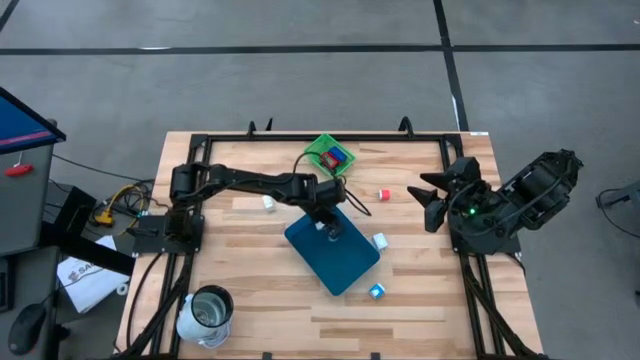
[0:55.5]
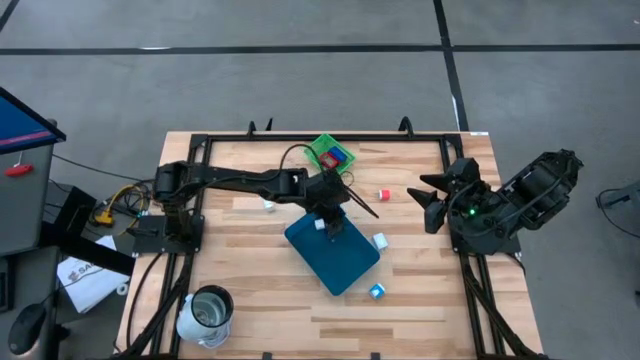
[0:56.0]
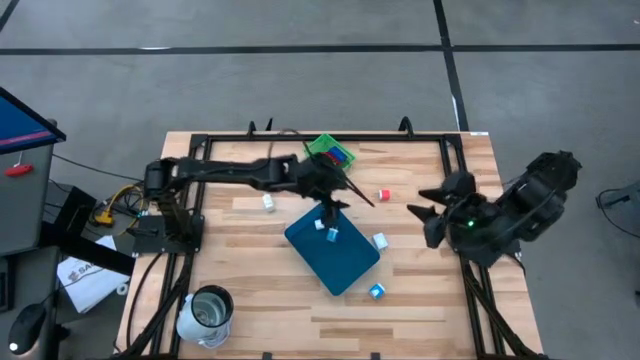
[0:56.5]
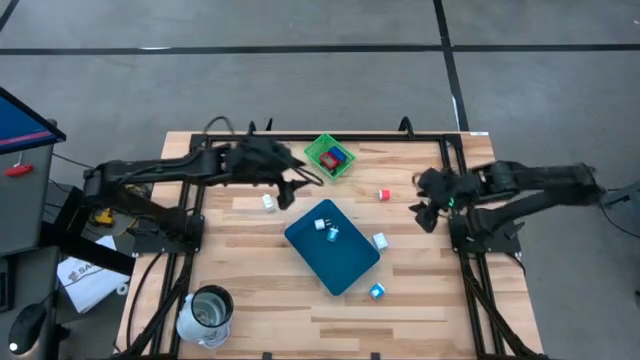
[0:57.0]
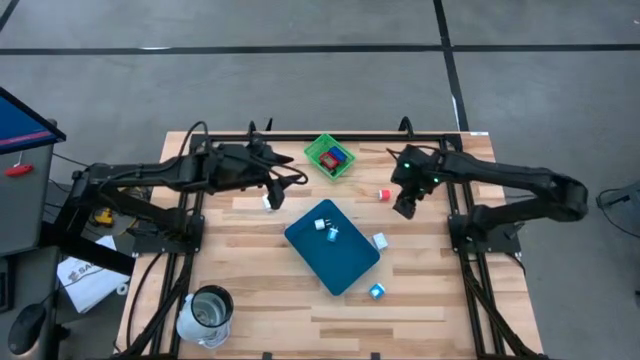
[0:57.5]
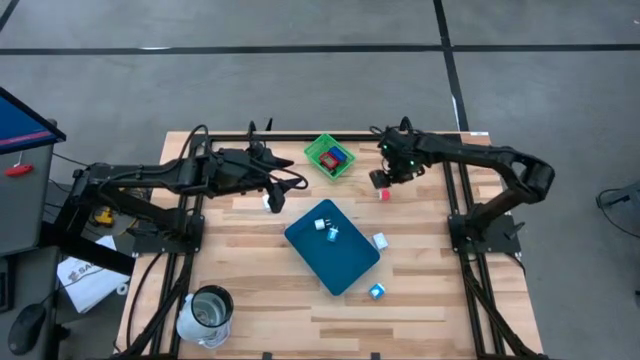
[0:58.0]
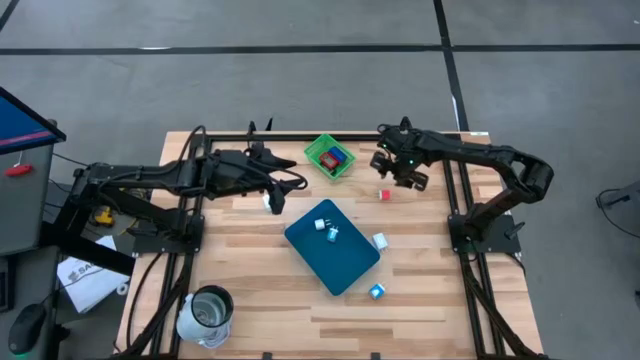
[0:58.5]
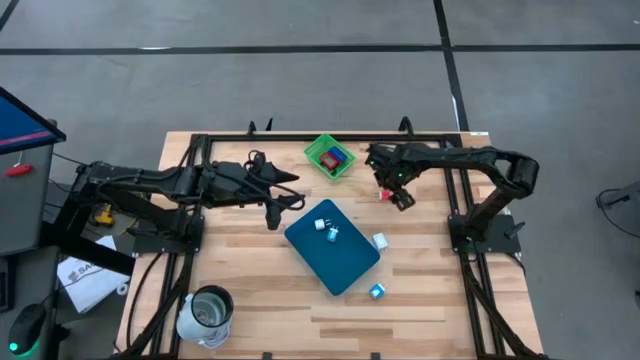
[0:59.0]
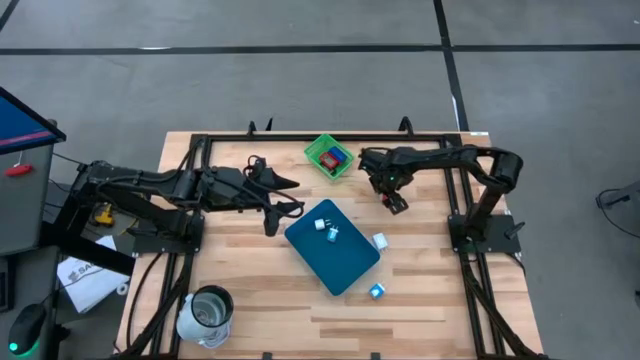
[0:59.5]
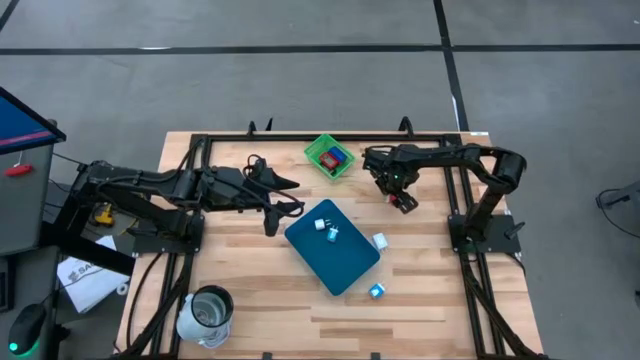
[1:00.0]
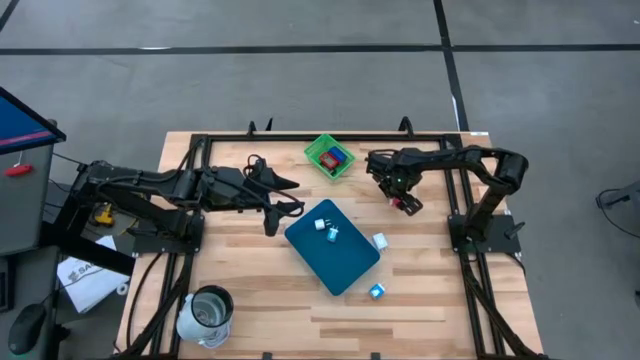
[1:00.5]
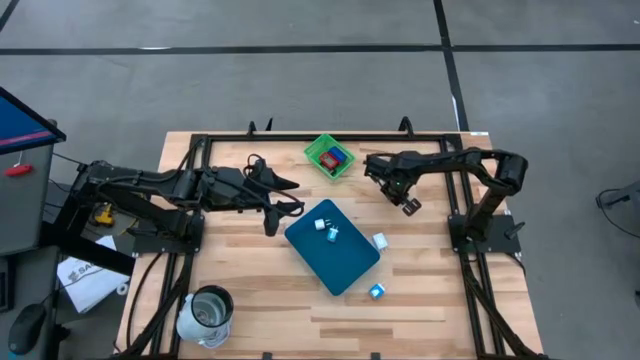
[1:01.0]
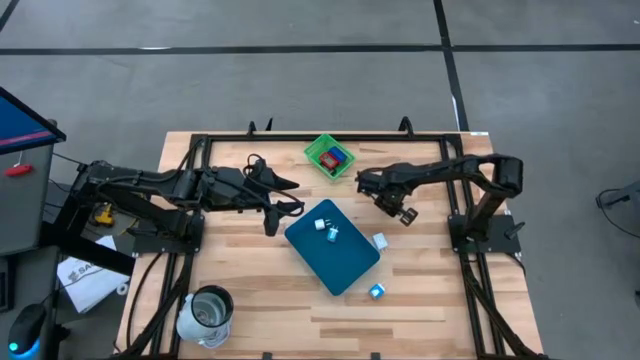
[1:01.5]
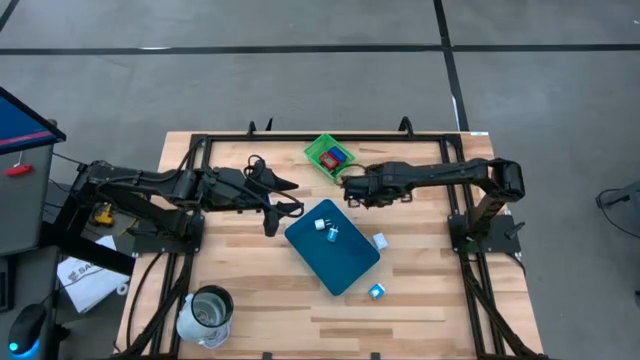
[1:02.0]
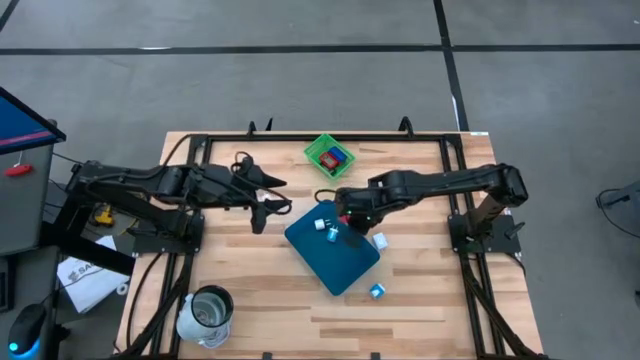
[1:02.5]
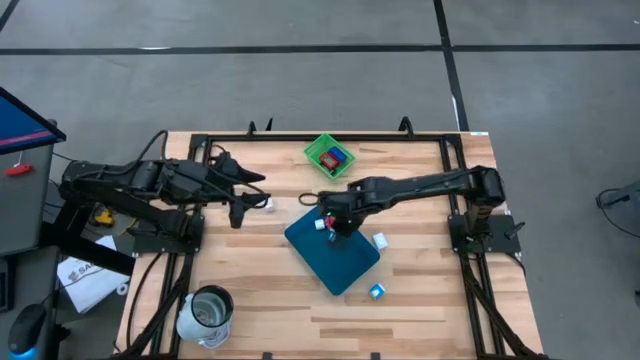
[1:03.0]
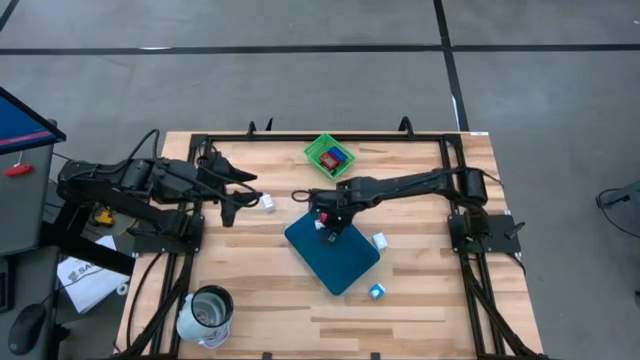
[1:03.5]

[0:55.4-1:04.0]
Task: Pick & Place Office items
Put the pink charger adapter into the blue bin

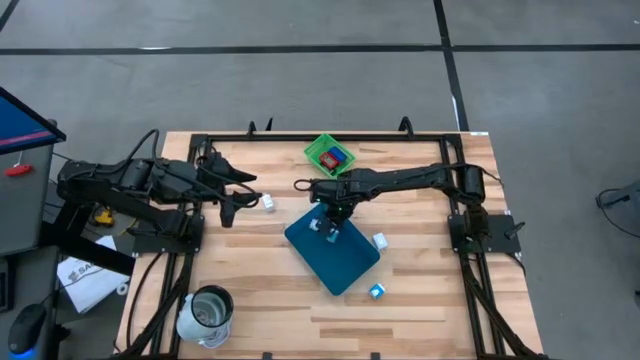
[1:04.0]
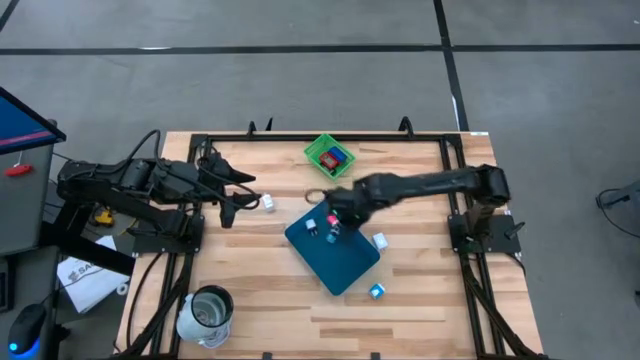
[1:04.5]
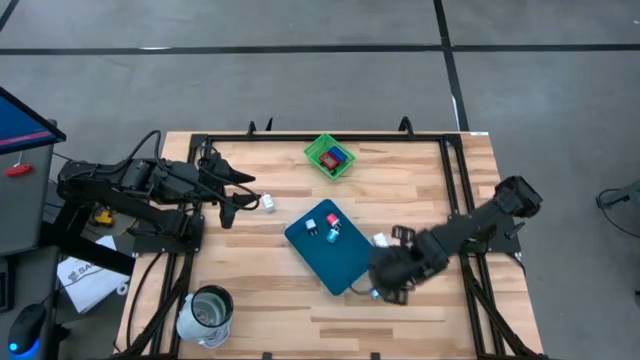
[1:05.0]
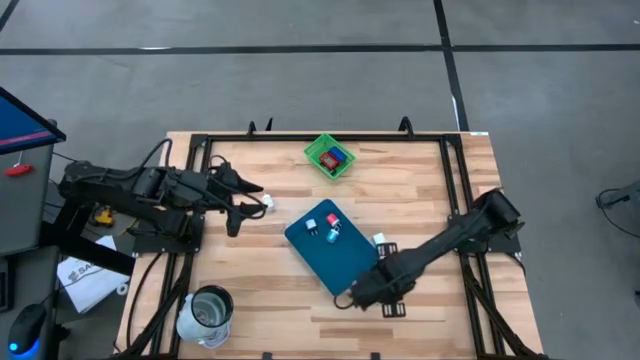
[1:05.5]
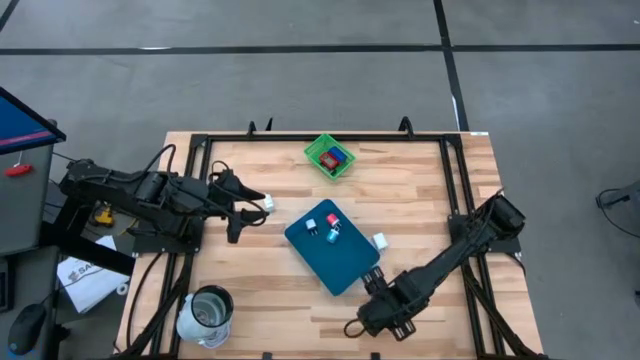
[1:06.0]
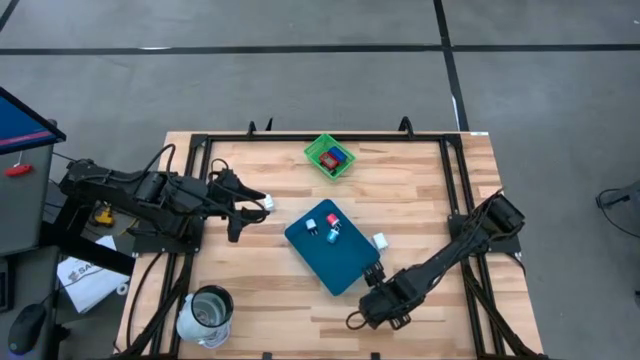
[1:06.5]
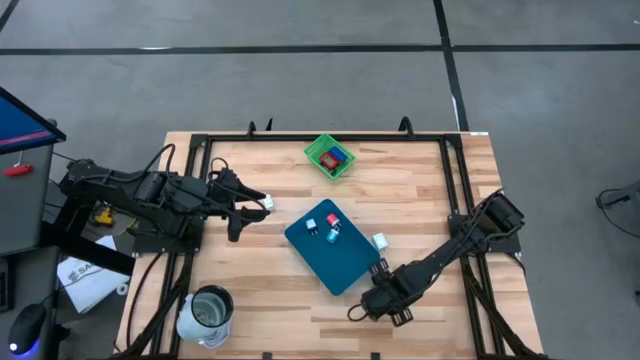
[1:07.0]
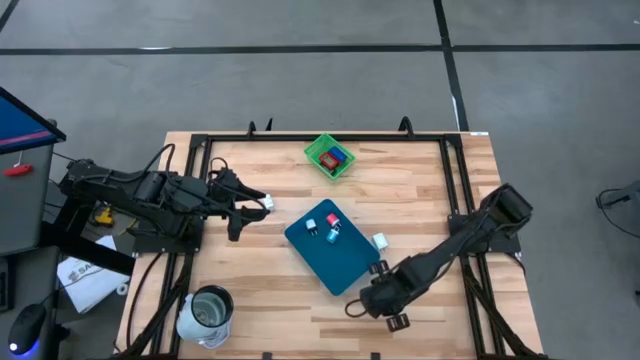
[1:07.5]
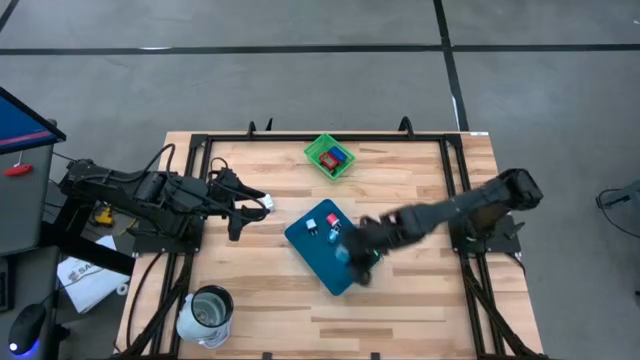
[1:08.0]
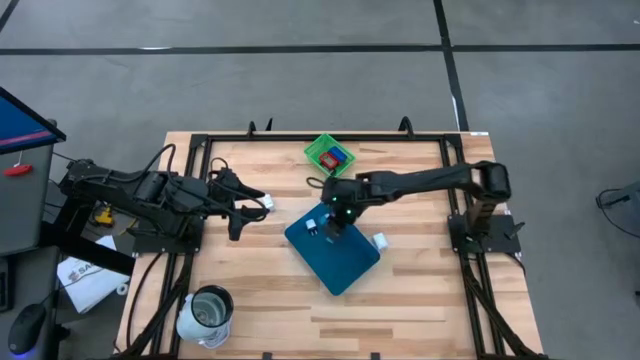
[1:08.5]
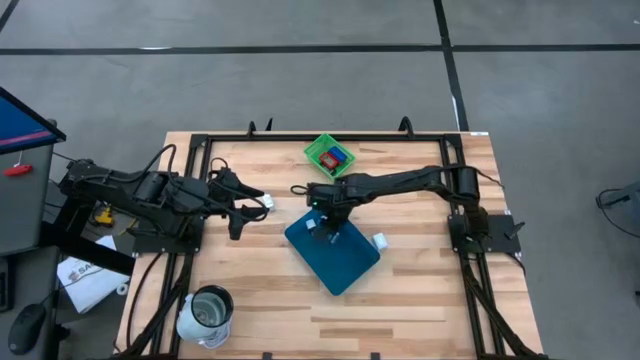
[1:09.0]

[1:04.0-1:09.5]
Put the blue charger adapter into the blue bin

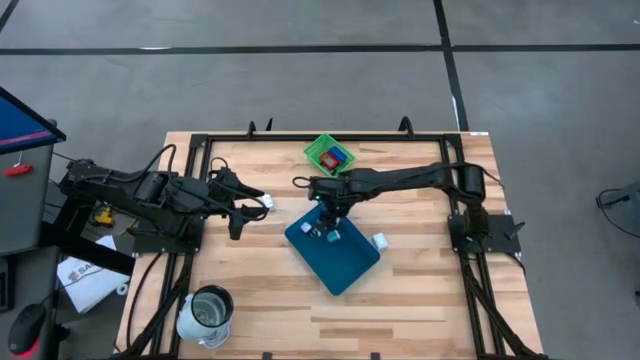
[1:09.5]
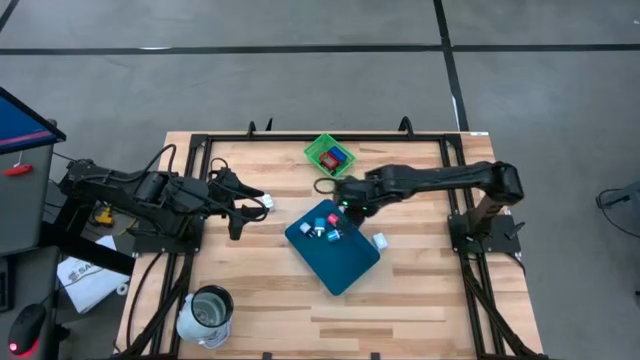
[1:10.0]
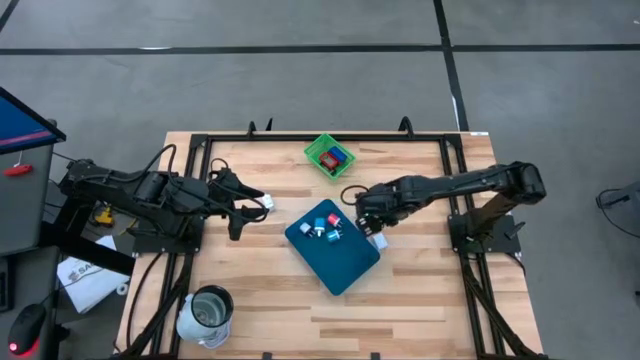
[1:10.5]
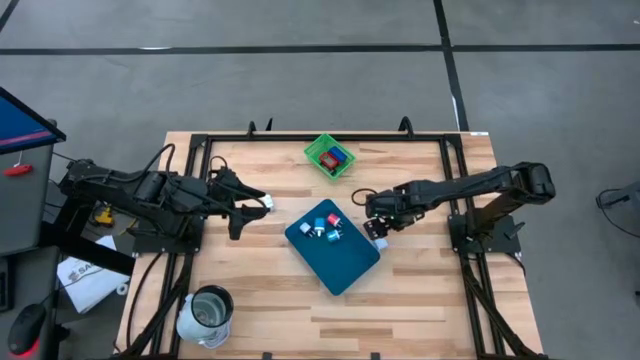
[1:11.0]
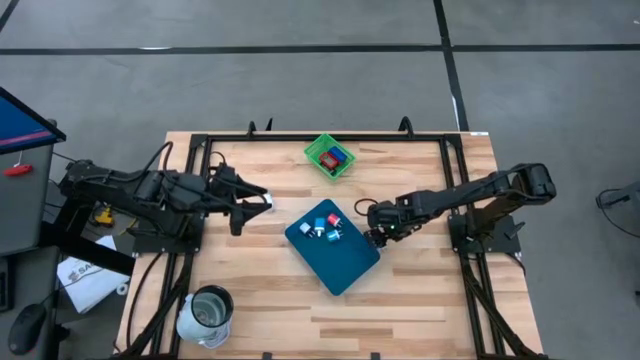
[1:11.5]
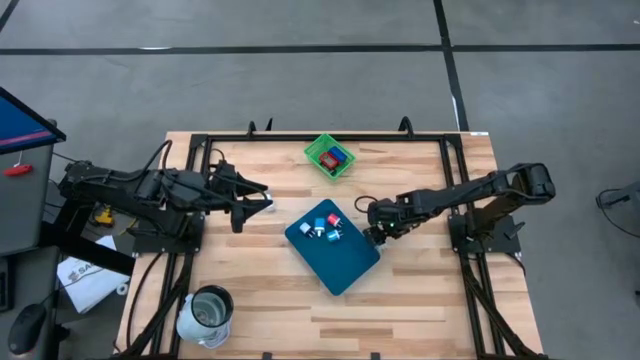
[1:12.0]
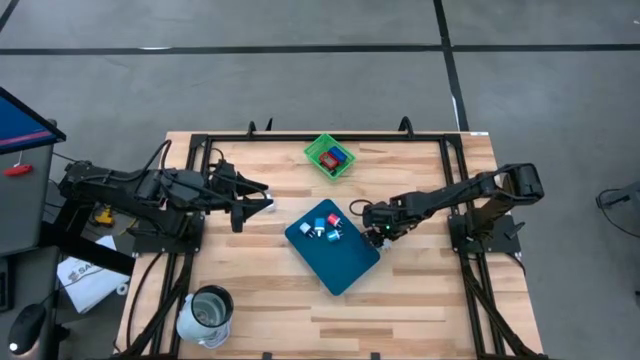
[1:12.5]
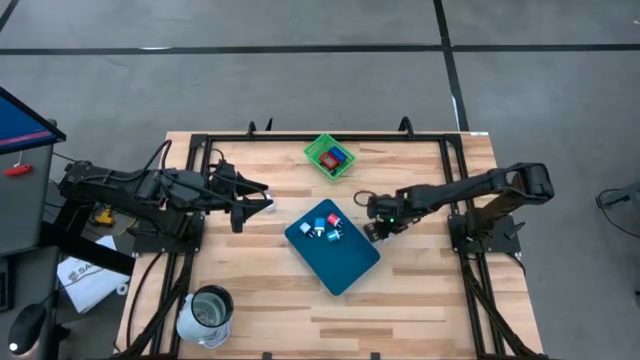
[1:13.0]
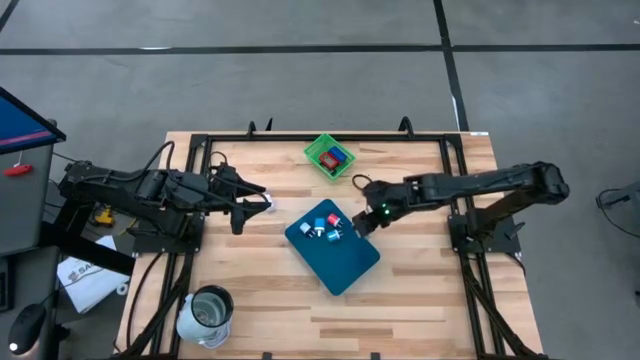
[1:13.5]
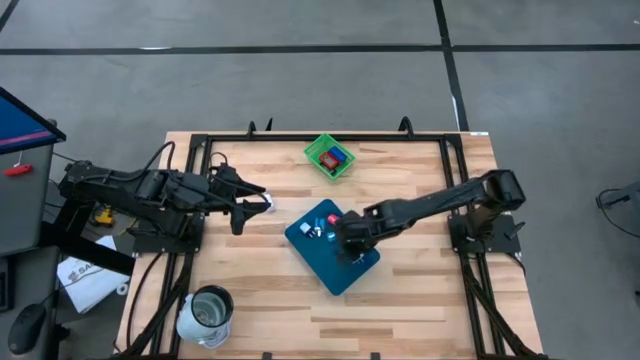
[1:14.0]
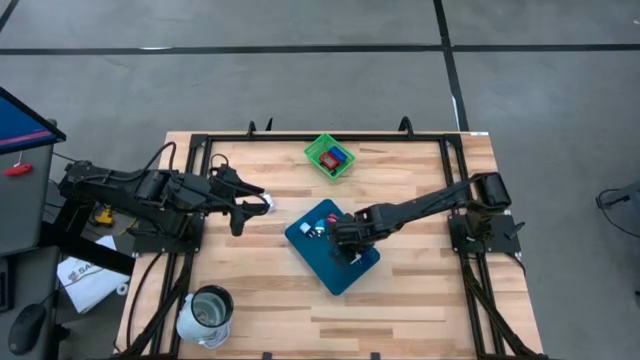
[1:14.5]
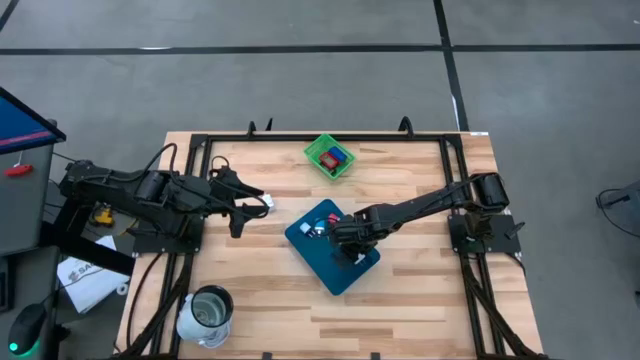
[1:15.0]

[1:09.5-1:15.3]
Put the bottom white charger adapter into the blue bin

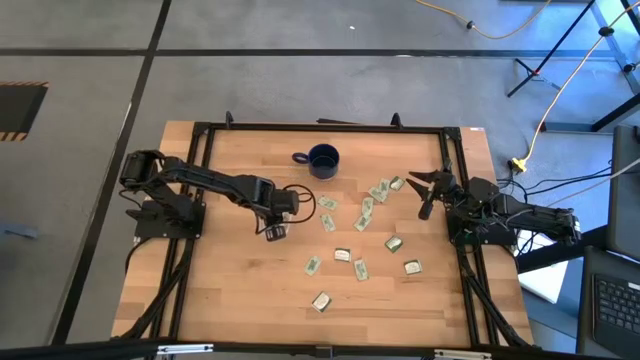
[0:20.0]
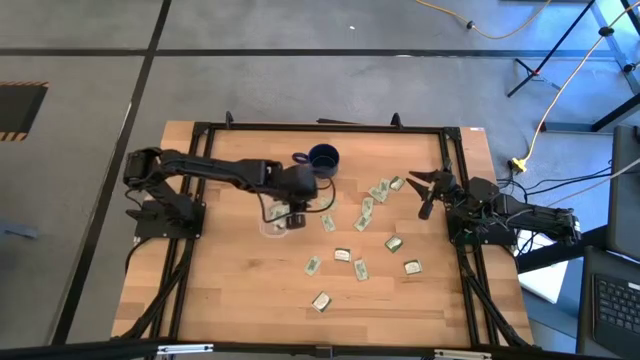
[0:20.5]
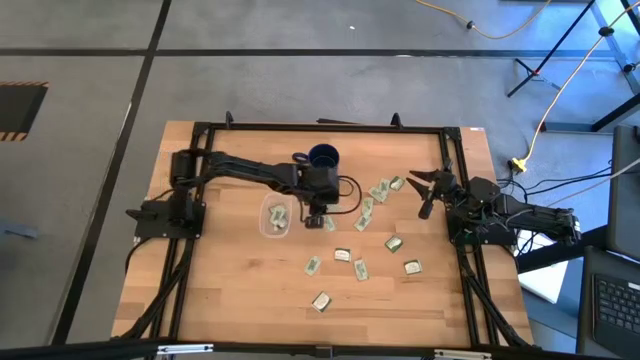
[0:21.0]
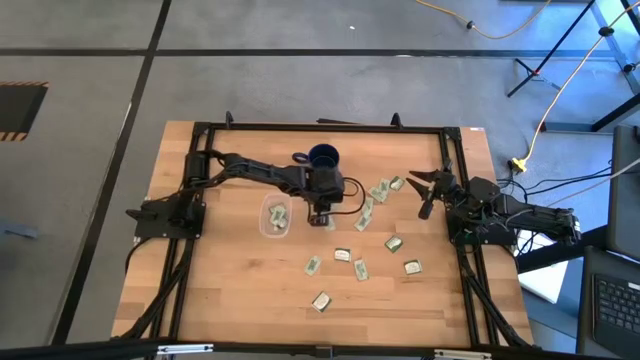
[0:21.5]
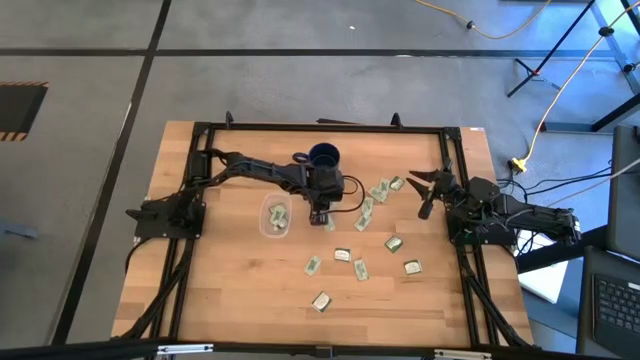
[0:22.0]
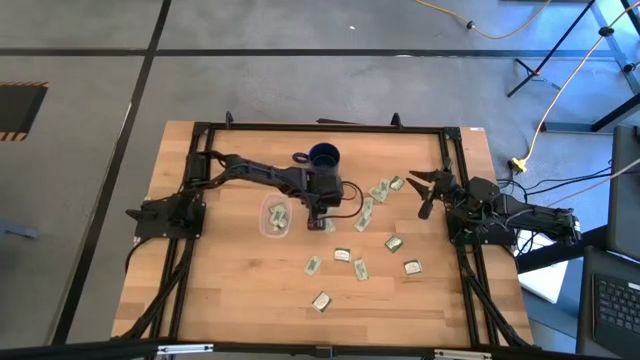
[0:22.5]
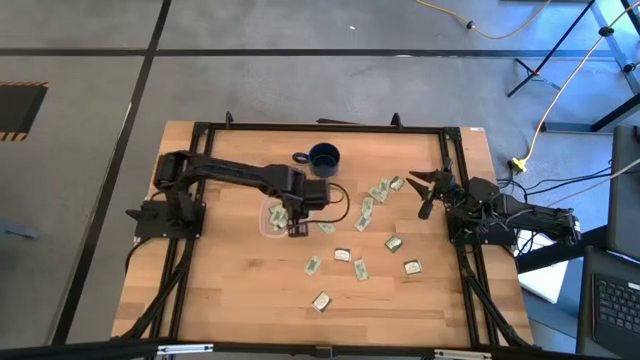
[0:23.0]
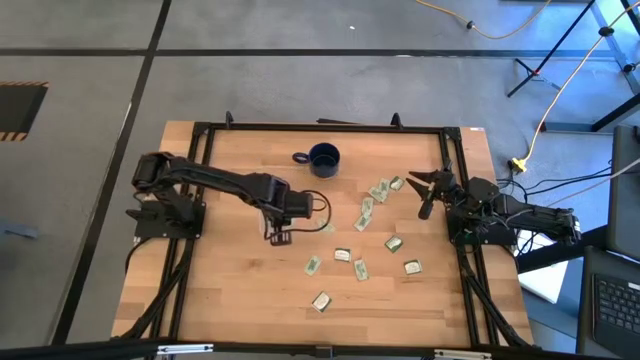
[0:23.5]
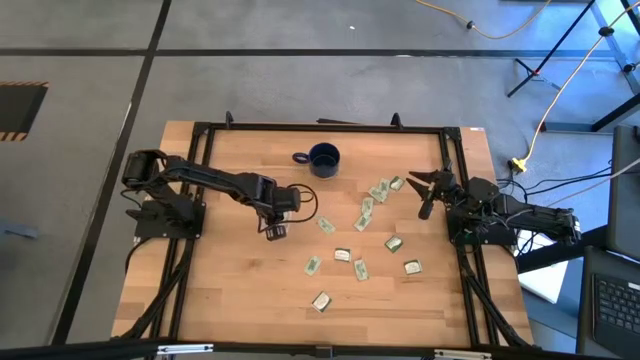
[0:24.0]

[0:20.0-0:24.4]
Task: Pick and place Stevia / Truvia into bins
Put the white stevia packet into the transparent container
